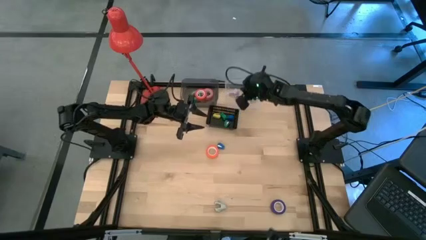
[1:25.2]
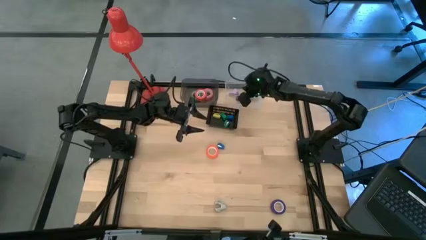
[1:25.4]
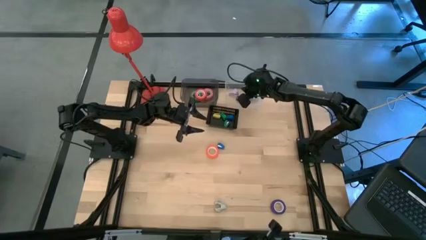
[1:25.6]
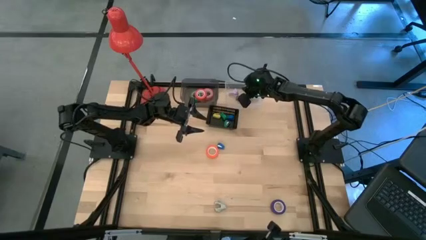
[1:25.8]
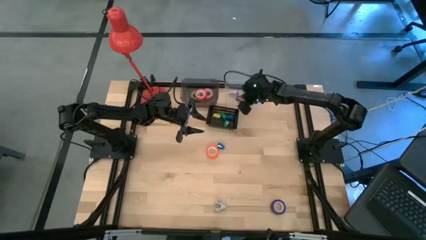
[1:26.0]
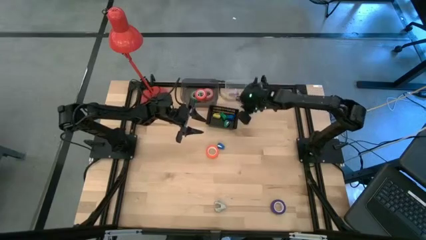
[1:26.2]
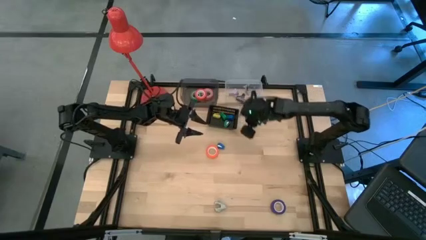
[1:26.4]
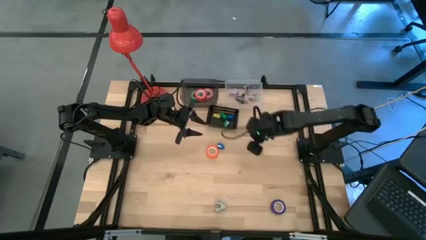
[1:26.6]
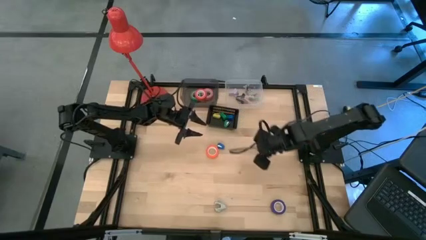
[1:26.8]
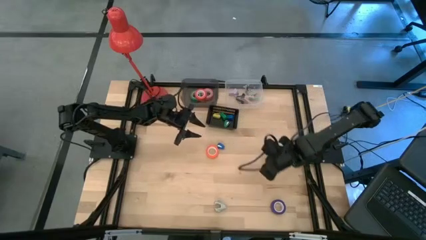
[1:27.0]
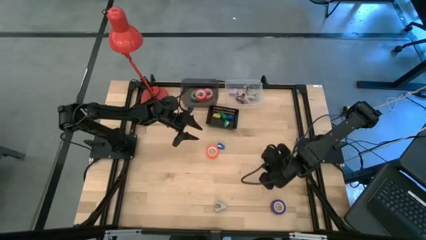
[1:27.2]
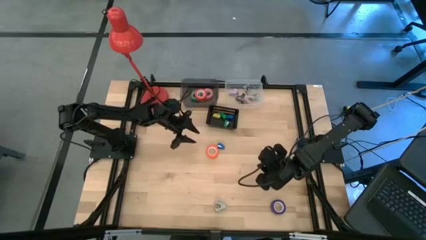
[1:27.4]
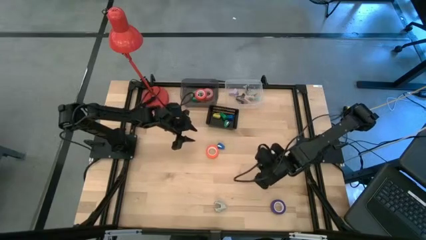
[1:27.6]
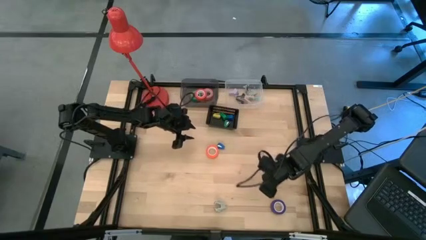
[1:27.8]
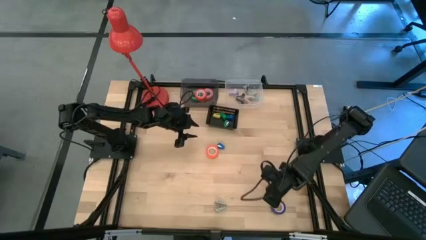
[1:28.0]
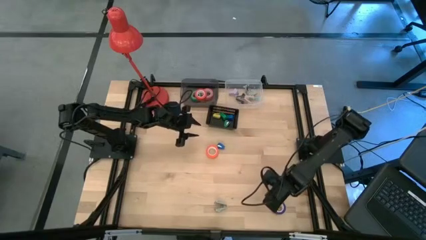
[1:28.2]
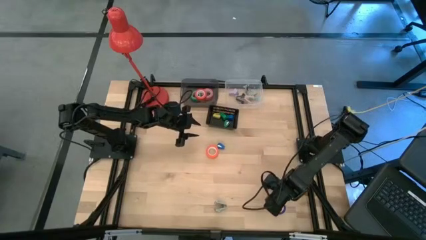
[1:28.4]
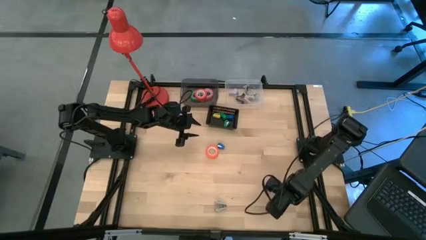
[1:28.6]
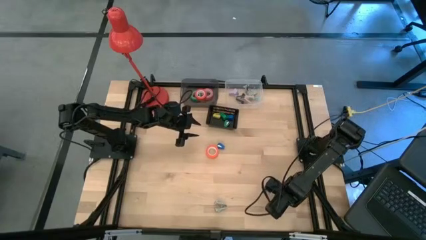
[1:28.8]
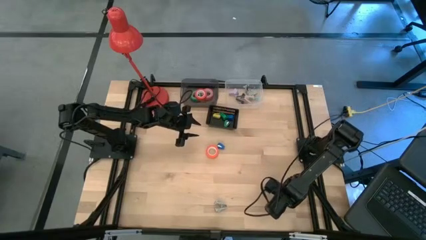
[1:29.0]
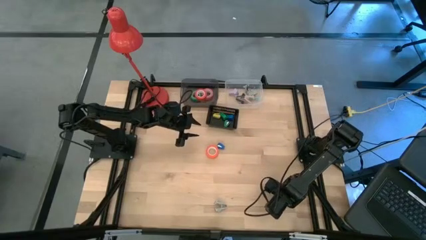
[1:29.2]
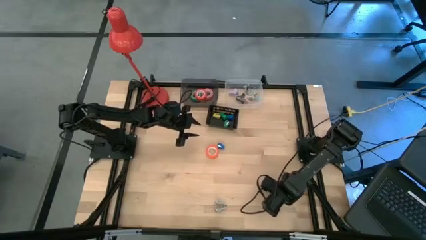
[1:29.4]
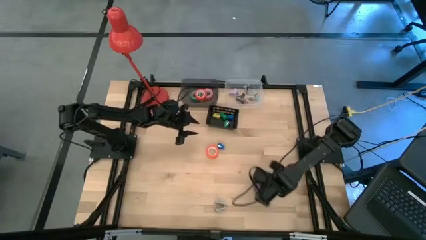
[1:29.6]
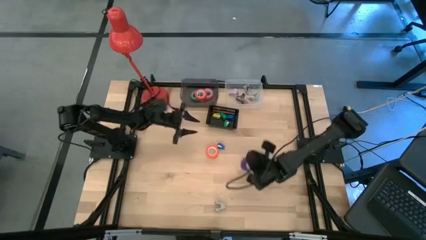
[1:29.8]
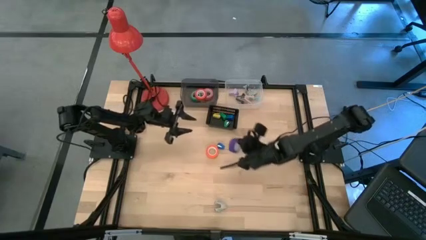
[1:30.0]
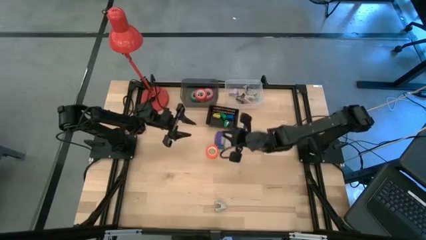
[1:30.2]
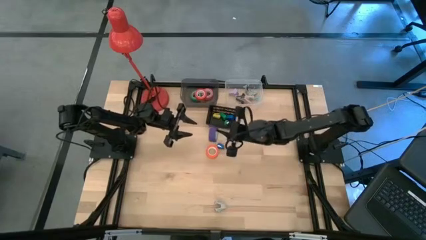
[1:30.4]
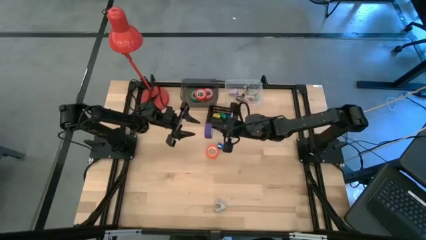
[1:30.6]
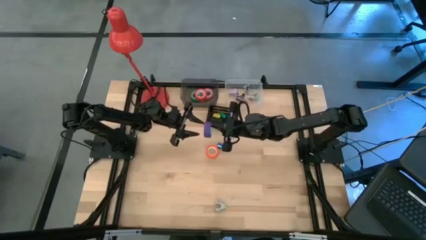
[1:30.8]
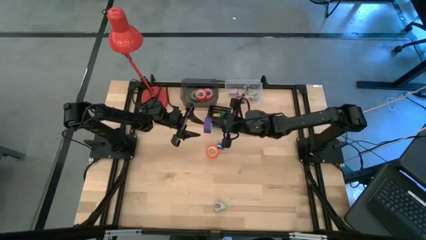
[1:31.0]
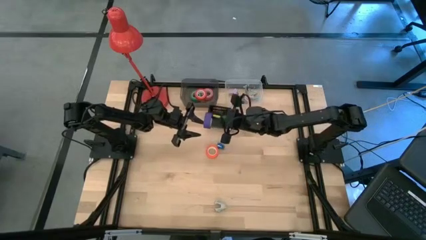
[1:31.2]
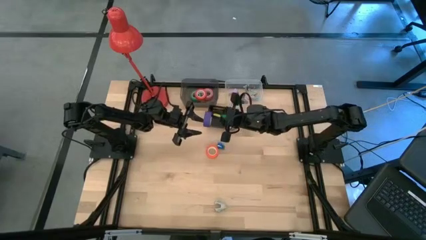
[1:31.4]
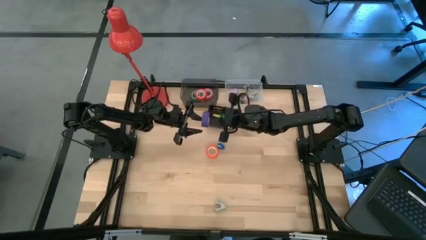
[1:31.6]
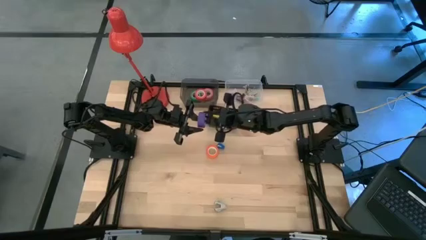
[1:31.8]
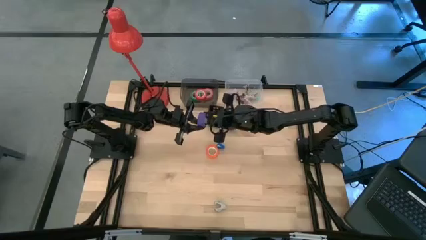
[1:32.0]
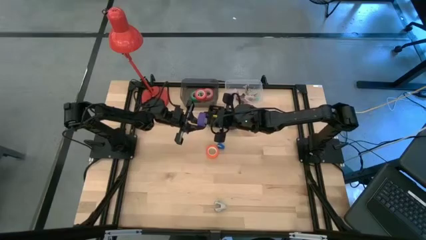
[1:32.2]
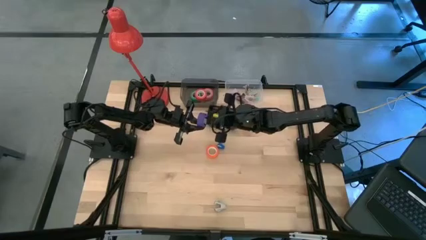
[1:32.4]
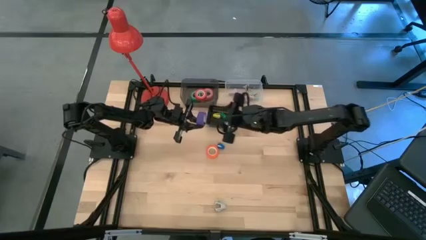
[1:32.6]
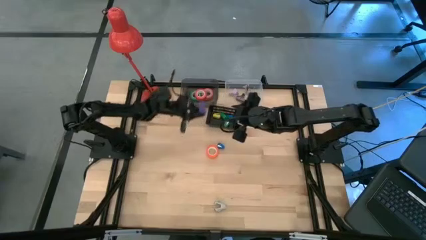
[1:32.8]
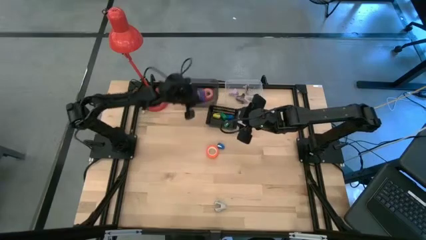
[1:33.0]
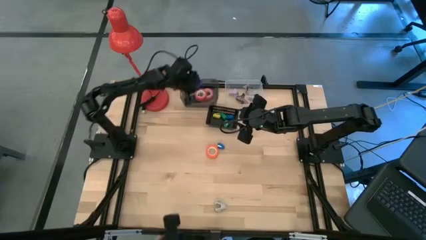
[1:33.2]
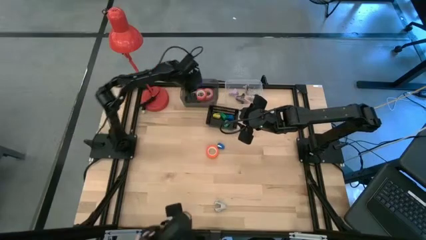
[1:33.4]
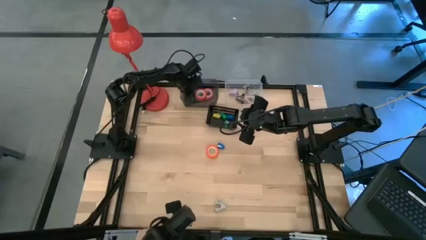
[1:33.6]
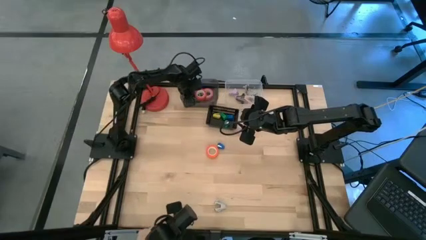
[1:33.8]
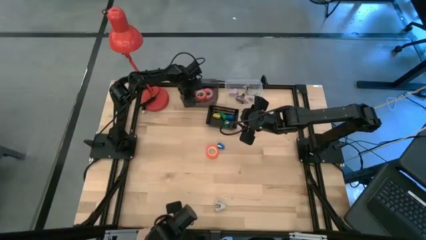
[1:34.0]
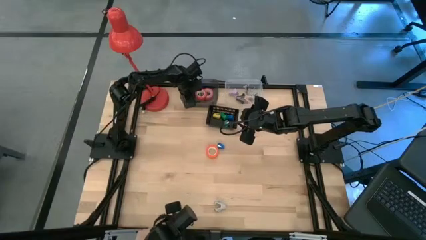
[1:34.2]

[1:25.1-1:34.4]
Task: Pick and place Stapler, Stapler remover, tape
Put the blue tape into the black transparent bin

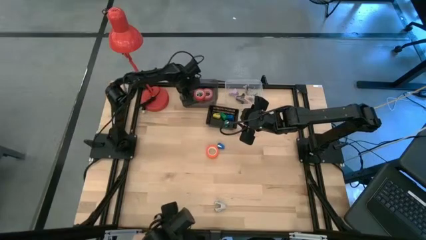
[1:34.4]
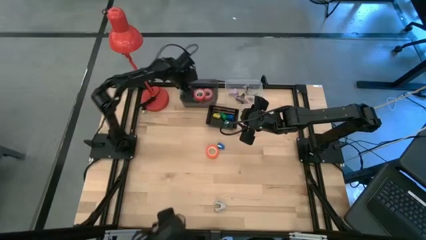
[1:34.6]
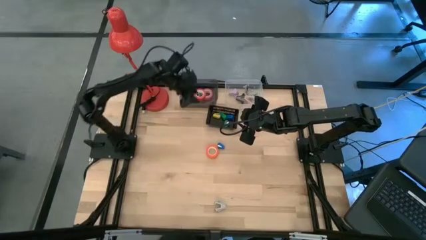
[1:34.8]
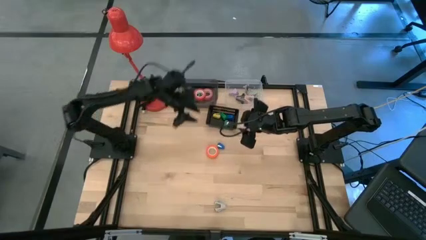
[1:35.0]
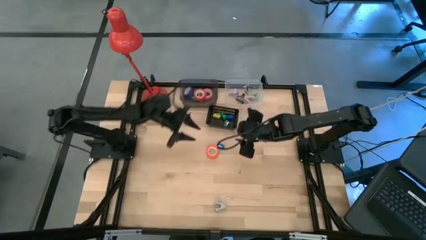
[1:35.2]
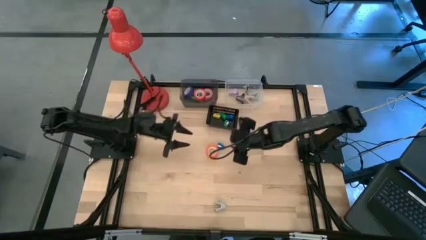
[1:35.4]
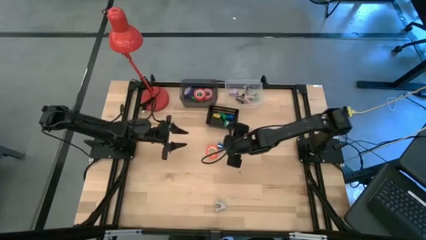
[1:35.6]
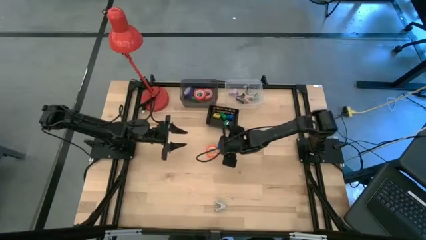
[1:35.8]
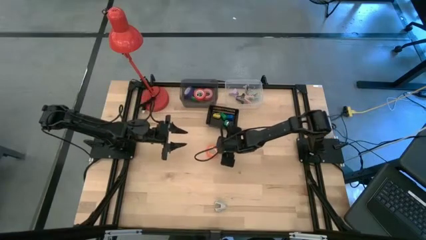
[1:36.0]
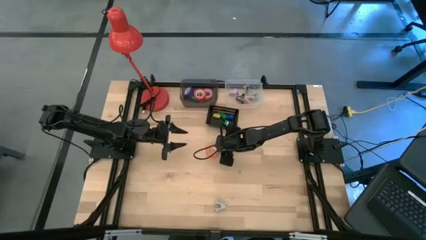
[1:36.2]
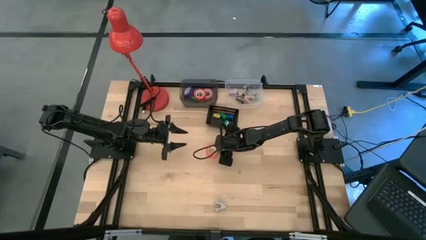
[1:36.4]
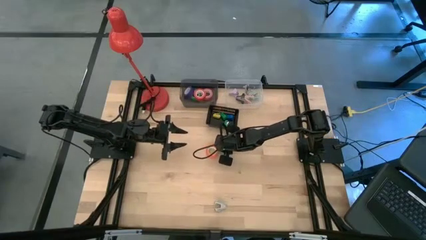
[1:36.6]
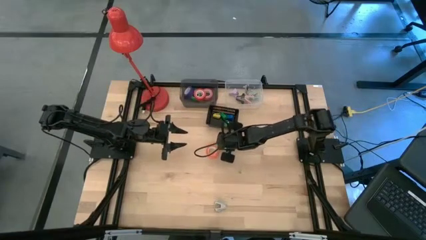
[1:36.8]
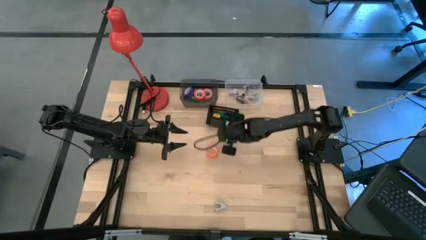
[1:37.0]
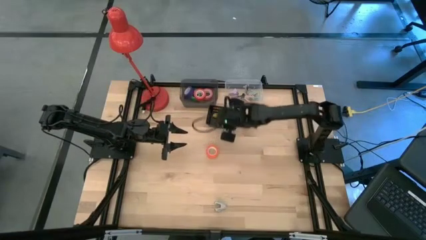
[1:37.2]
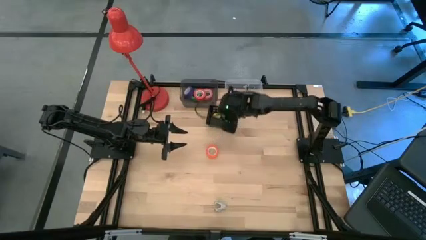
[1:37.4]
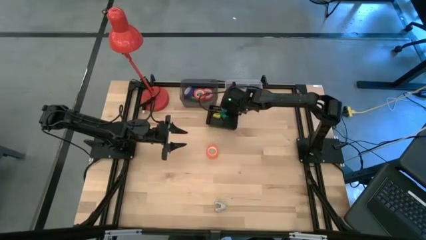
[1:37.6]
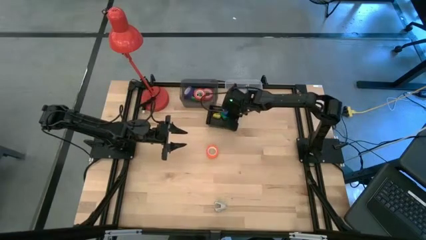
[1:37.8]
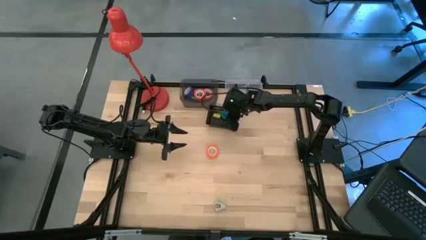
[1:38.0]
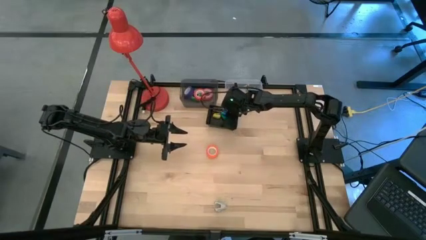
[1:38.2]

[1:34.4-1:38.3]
Put the blue mini-stapler into the black bin

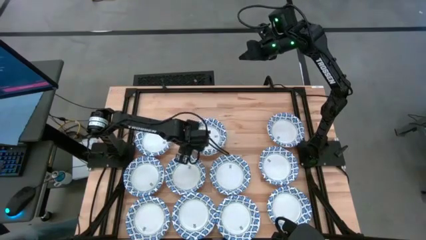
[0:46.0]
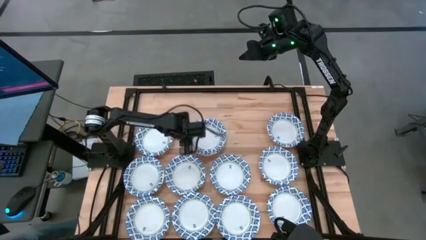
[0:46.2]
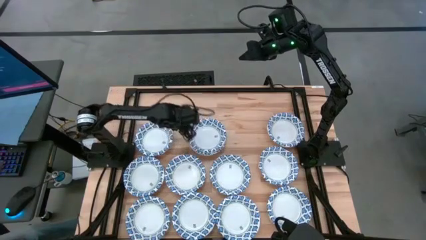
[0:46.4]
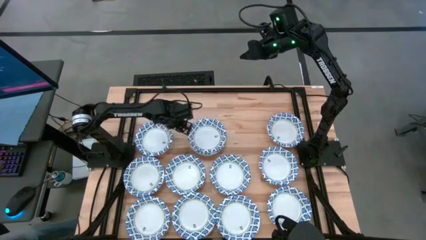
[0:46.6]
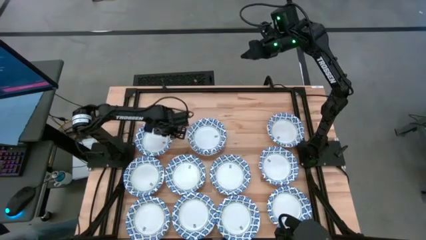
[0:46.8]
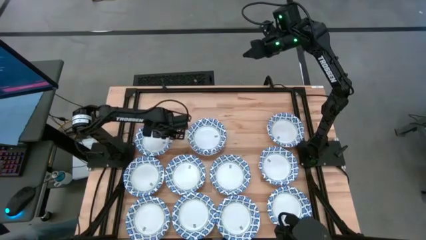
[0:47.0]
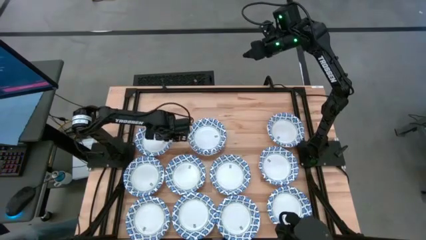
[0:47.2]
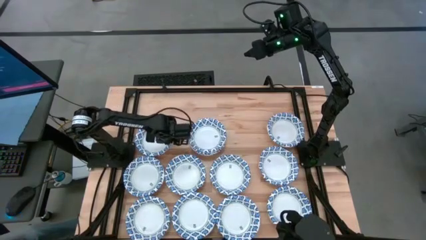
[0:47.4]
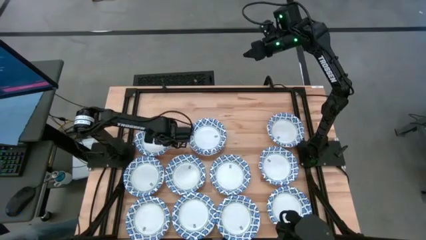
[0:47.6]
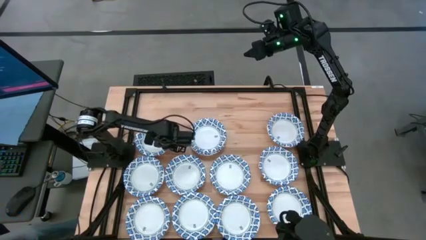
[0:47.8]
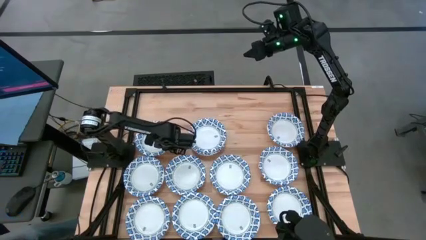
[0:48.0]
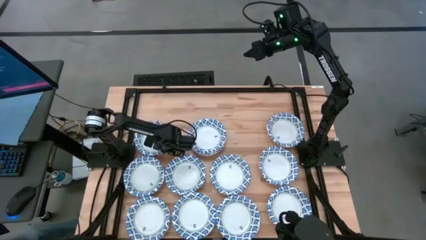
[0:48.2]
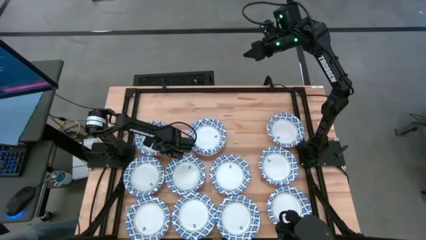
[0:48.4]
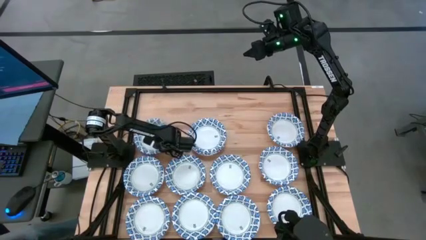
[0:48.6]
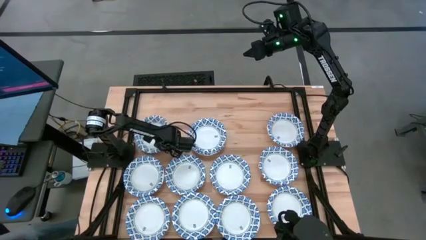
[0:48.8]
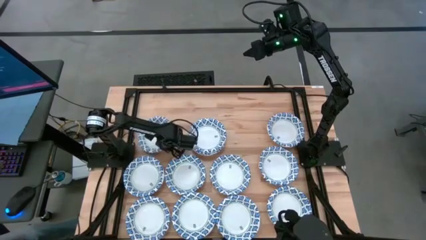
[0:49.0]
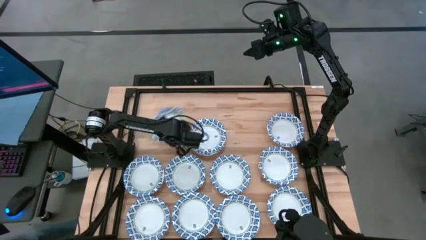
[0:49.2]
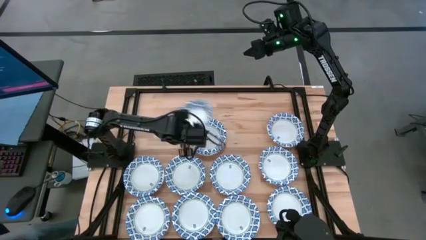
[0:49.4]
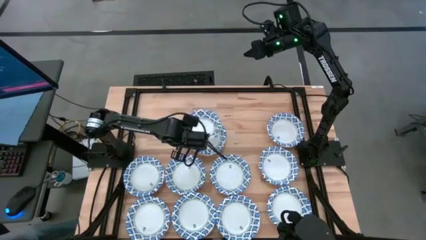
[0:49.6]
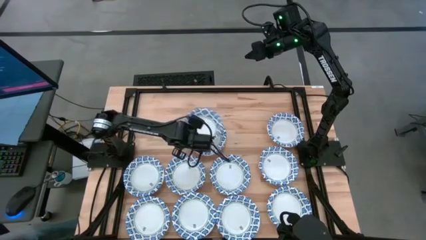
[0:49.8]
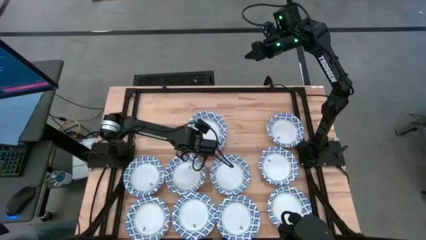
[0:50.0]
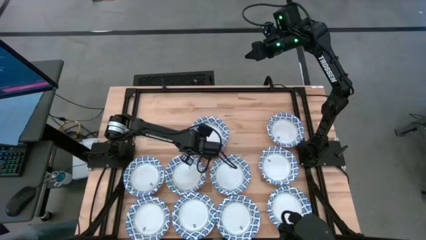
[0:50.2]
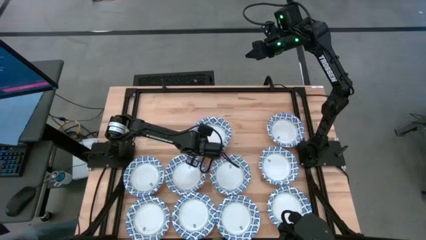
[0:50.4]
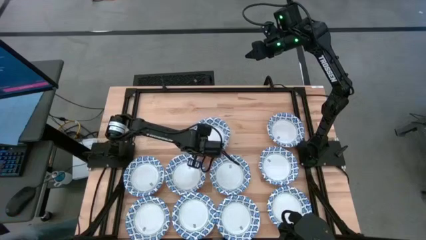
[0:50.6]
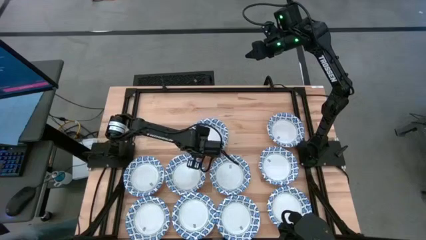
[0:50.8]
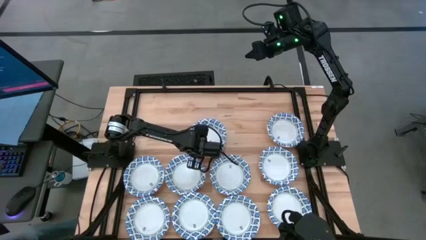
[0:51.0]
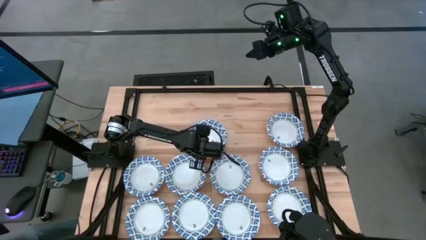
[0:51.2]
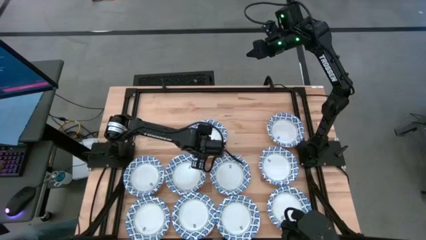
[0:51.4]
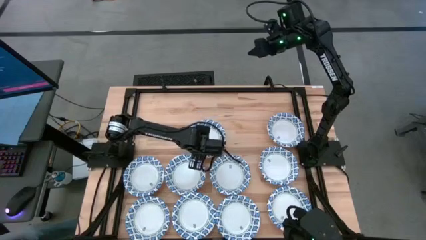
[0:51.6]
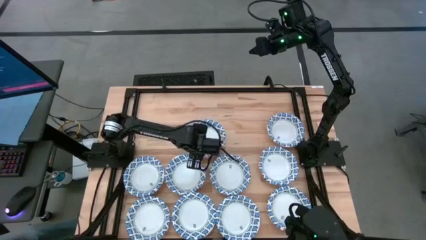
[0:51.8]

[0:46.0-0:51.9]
Task: Nest bowls inside each other
Stack the blue bowl on top of the blue bowls
